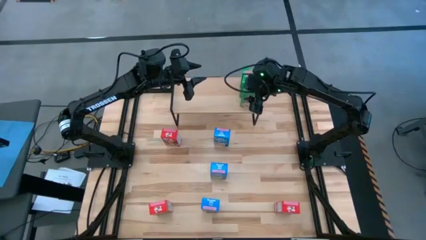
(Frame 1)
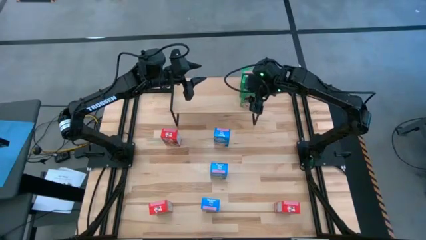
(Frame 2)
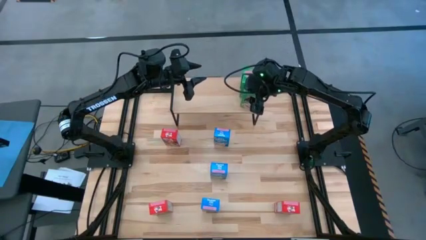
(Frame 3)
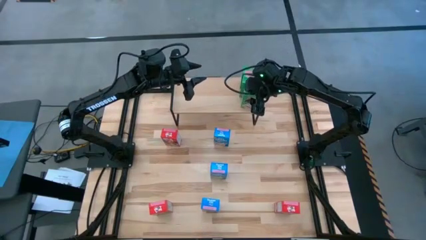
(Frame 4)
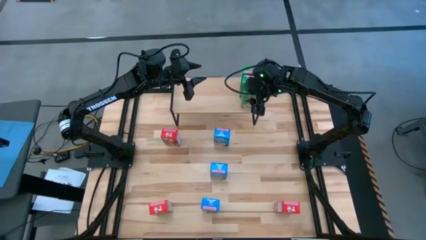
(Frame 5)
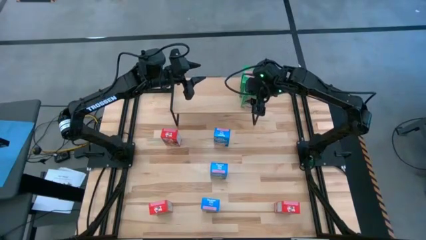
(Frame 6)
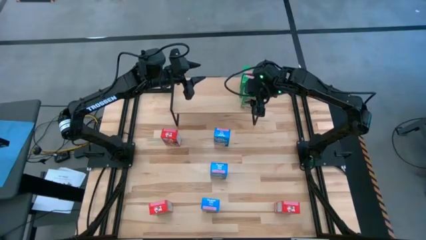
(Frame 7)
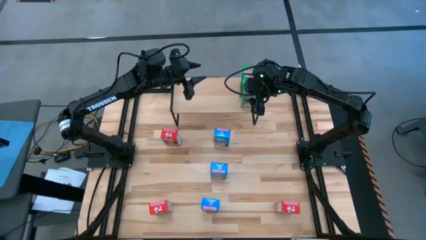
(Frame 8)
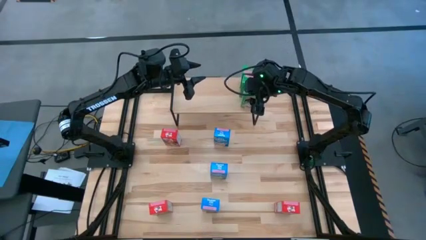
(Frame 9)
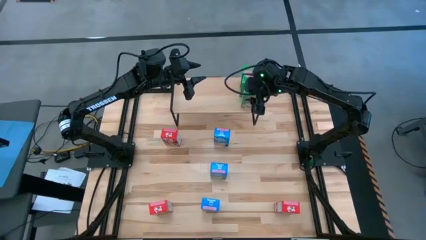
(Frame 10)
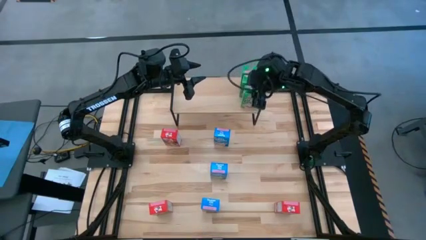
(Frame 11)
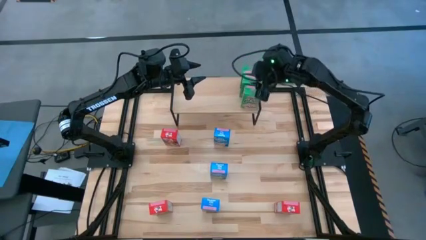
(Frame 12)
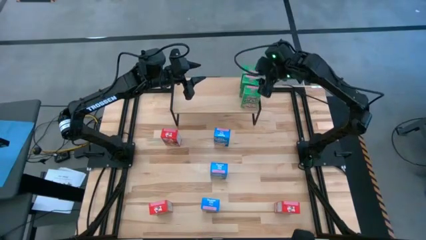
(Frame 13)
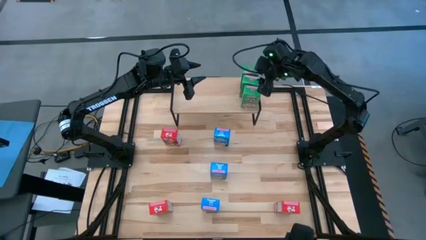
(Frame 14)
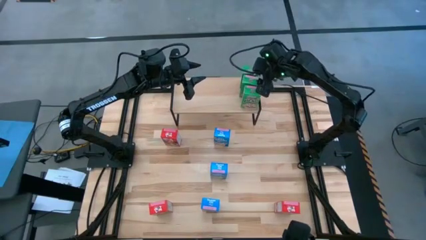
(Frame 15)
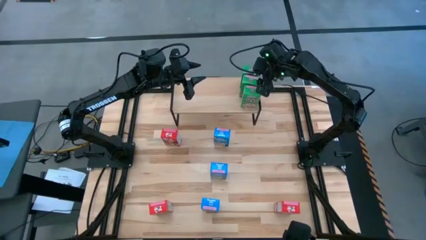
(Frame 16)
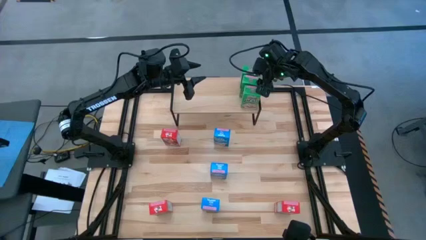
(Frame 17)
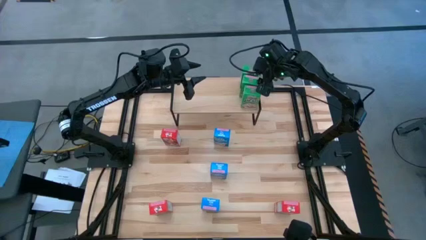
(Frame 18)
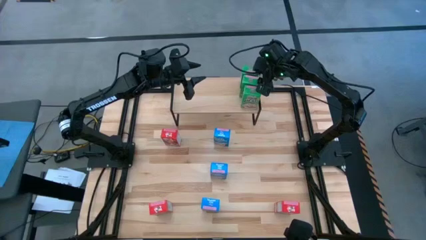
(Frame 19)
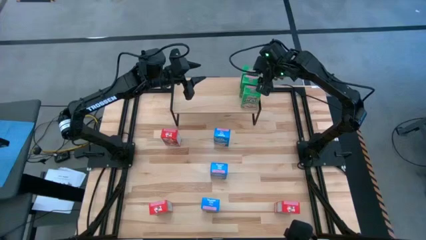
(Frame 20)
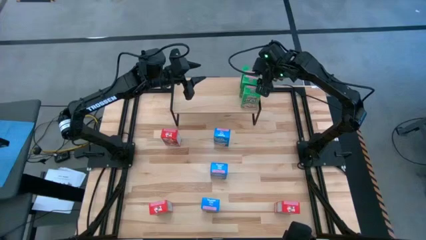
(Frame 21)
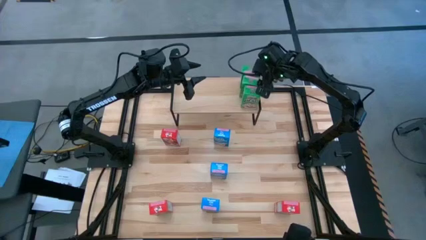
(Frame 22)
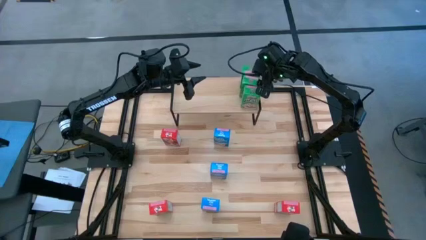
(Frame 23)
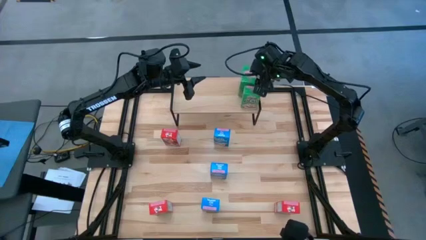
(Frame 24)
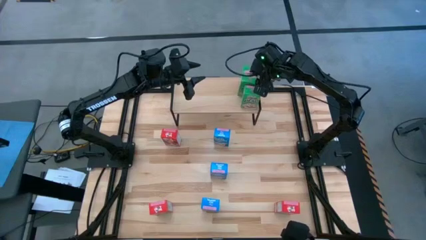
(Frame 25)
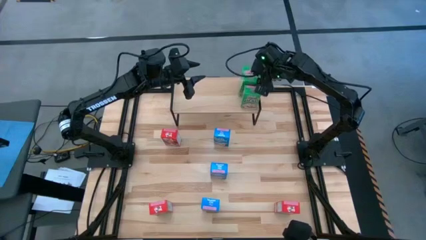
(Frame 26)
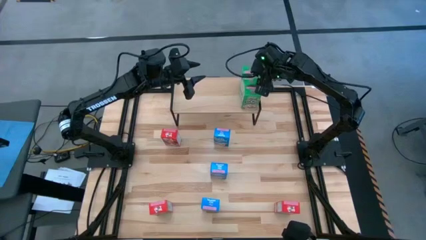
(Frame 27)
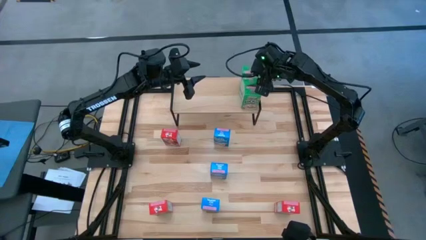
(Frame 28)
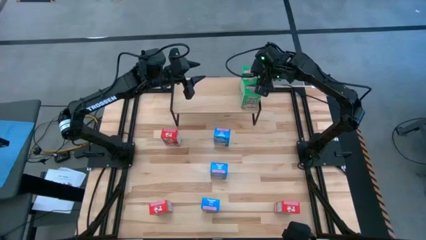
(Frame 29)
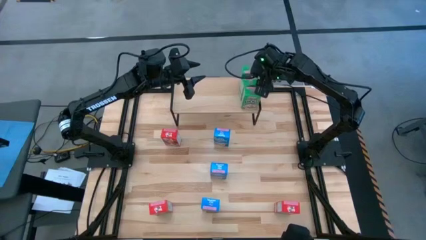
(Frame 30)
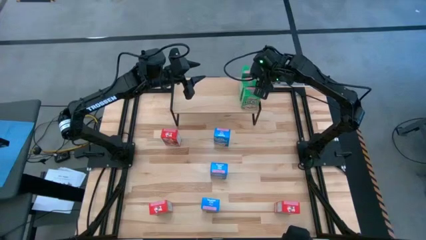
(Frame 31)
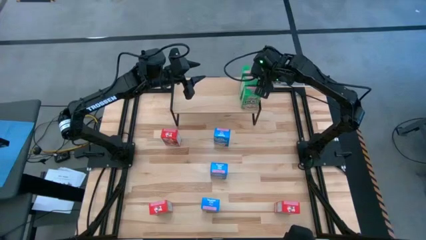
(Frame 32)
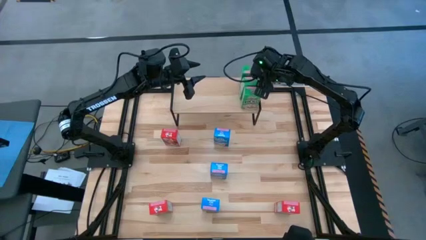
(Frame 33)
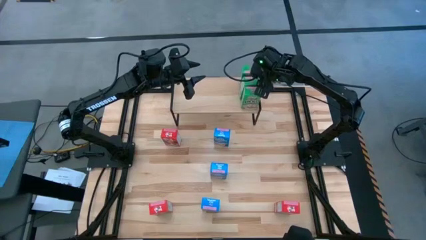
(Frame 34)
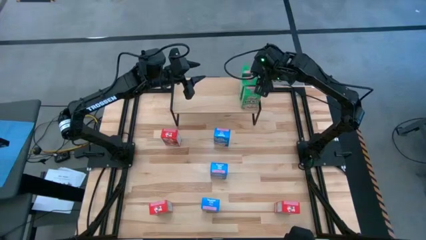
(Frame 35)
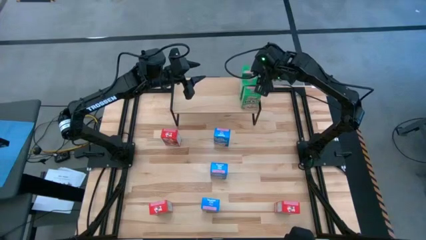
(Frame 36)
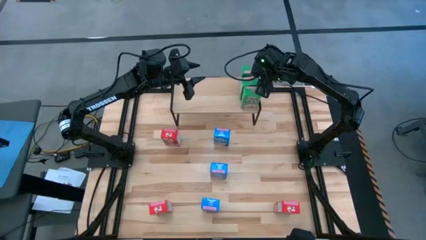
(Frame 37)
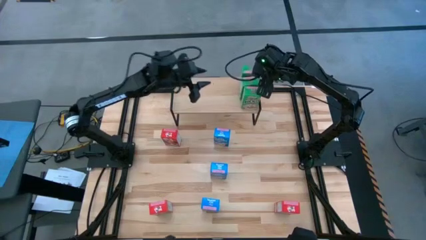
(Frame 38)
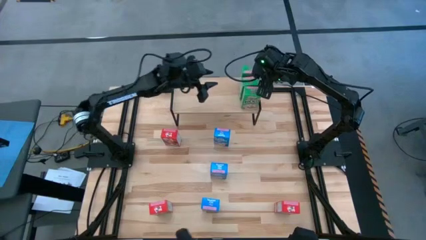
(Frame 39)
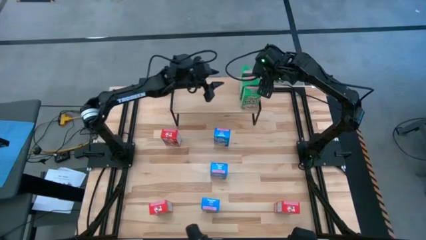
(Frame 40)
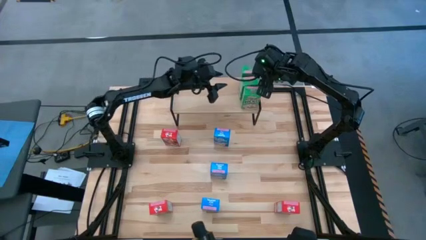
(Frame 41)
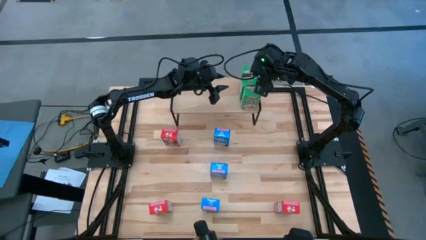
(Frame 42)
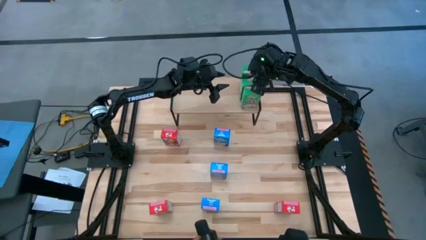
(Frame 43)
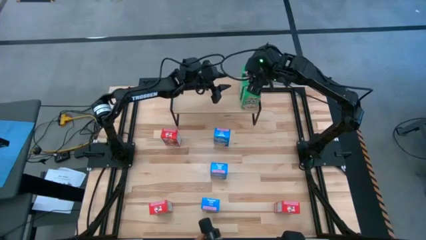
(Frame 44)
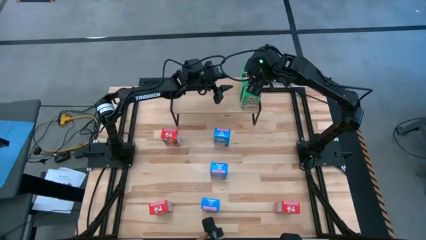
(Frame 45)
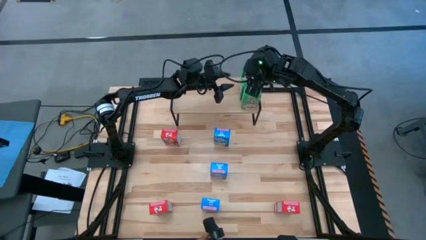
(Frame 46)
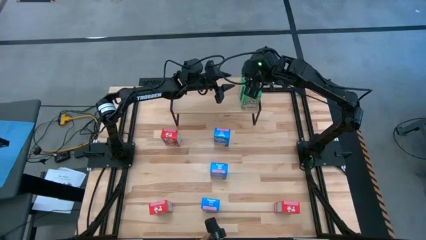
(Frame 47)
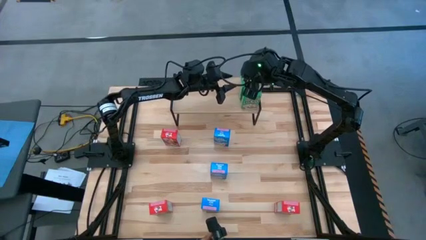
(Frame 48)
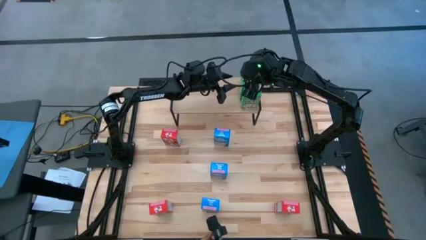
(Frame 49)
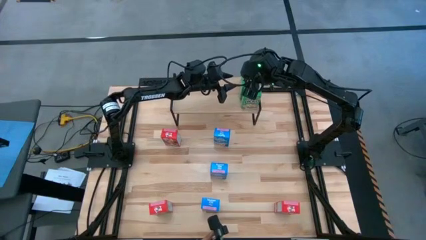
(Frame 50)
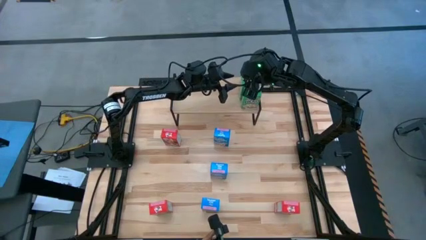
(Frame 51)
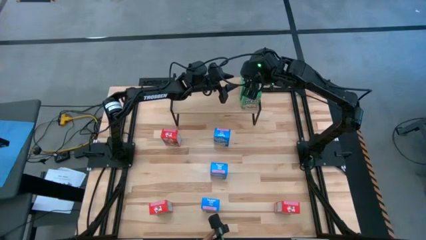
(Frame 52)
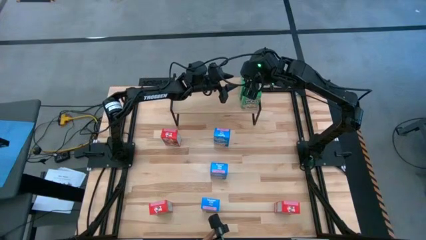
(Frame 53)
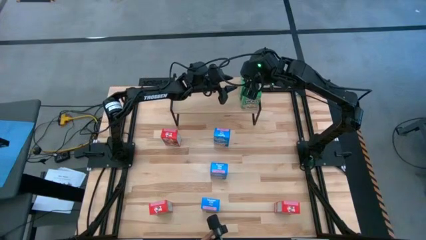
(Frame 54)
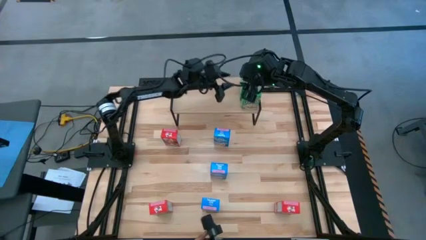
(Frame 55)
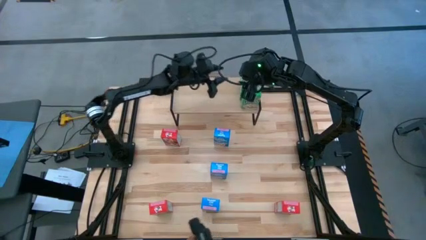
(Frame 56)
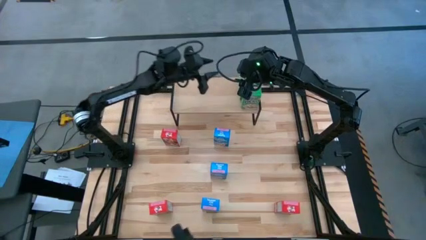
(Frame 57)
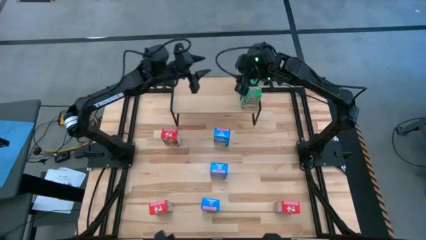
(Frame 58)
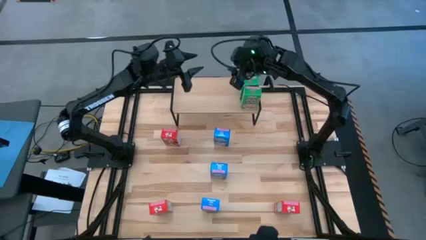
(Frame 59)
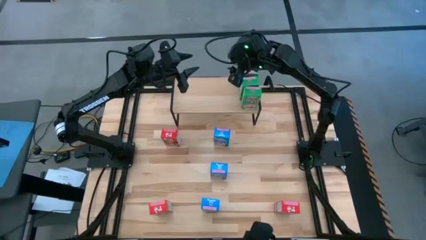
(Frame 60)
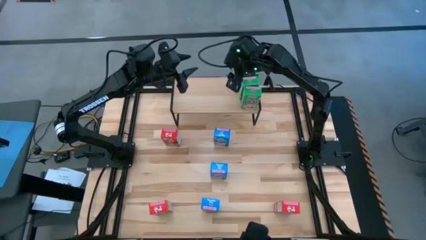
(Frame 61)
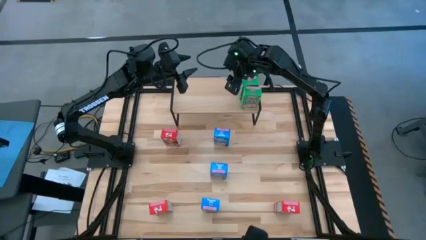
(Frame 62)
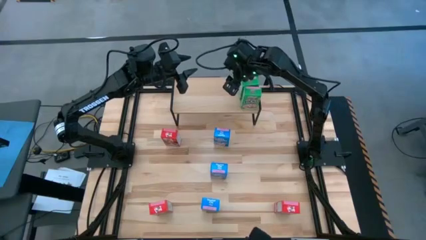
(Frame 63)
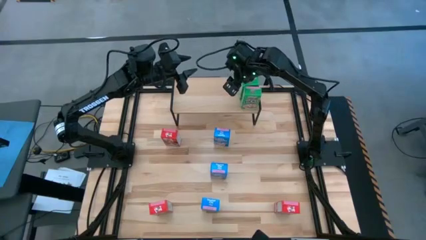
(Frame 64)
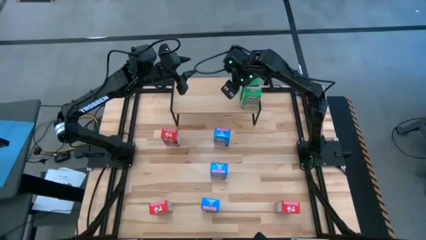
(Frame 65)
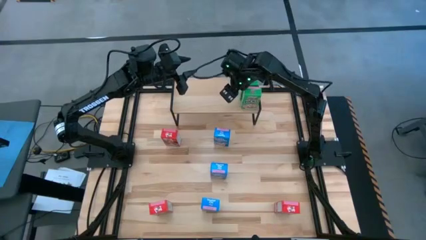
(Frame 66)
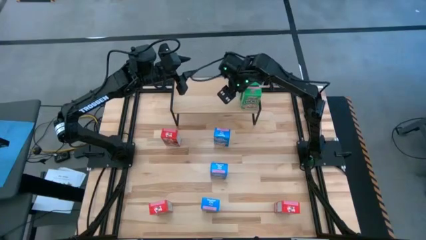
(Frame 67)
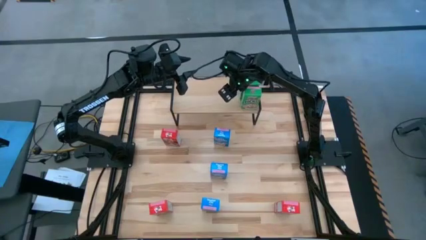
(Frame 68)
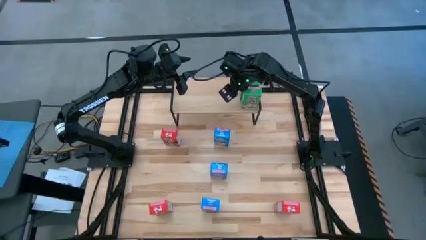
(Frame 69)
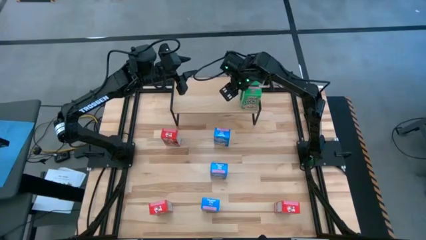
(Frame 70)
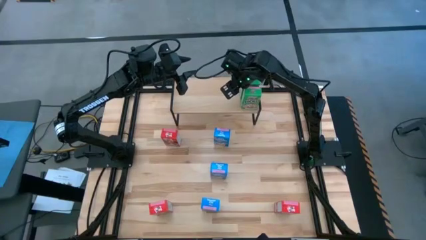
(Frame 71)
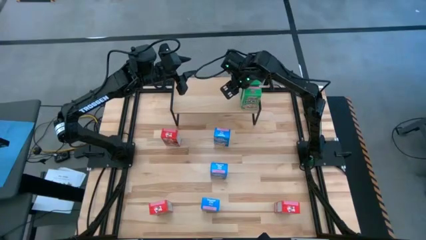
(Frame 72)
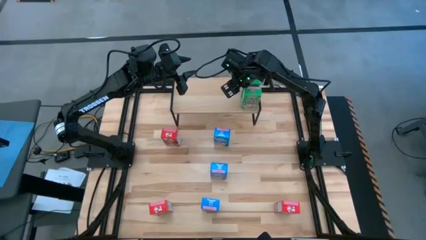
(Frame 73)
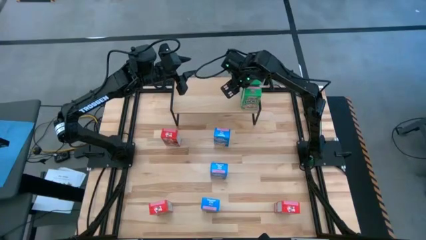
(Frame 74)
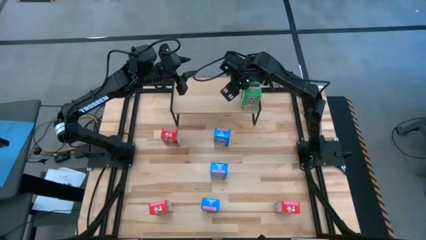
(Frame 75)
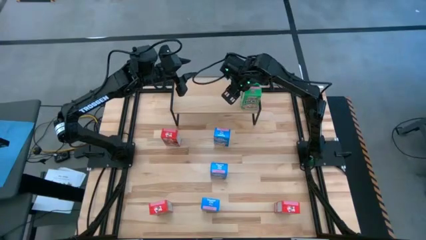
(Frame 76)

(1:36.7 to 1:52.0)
Task: Stack cereal on shelf
Adjust the green cereal boxes on the shelf
